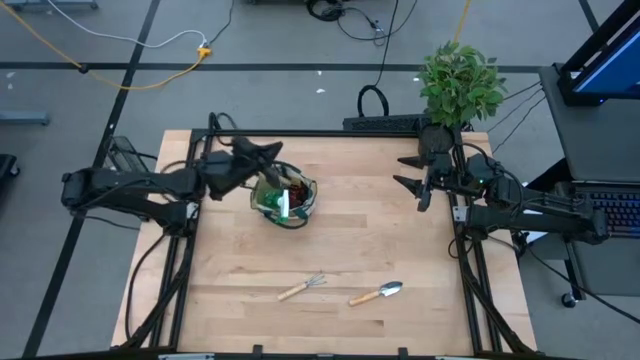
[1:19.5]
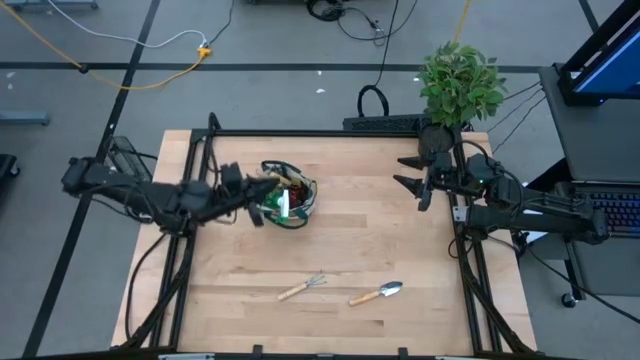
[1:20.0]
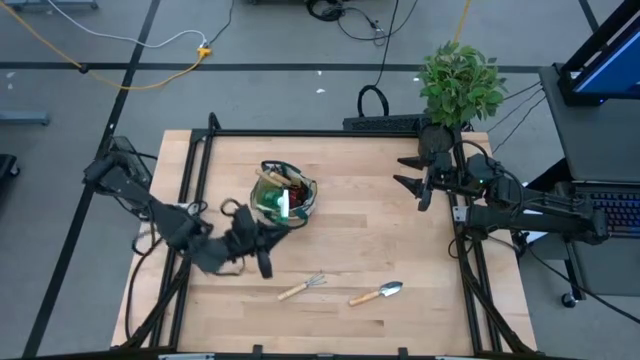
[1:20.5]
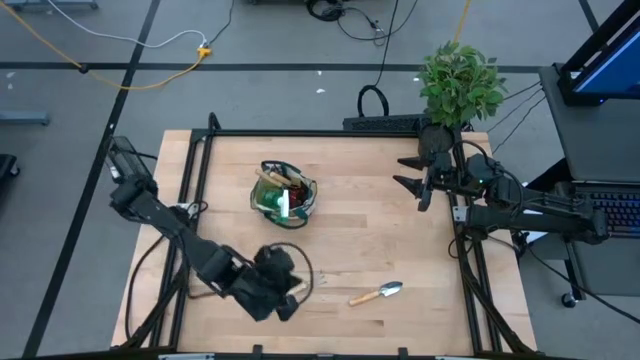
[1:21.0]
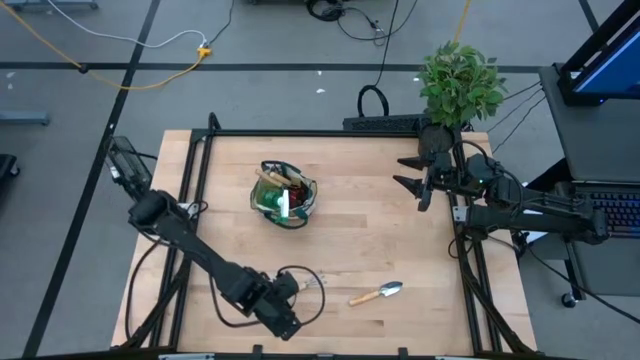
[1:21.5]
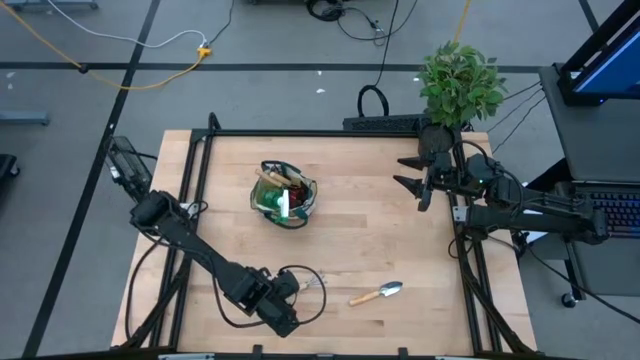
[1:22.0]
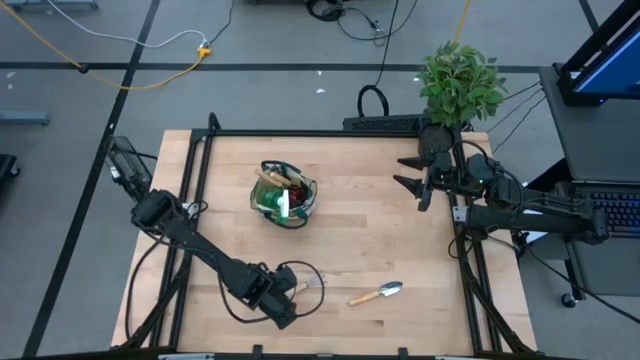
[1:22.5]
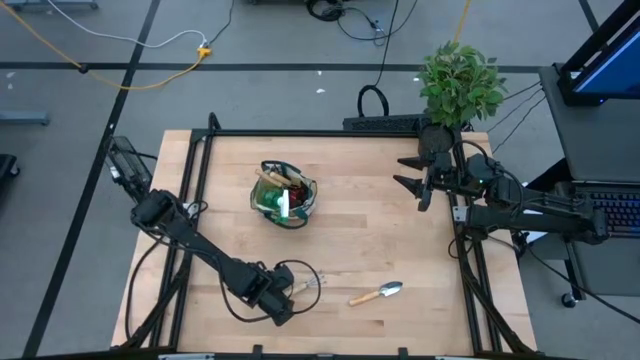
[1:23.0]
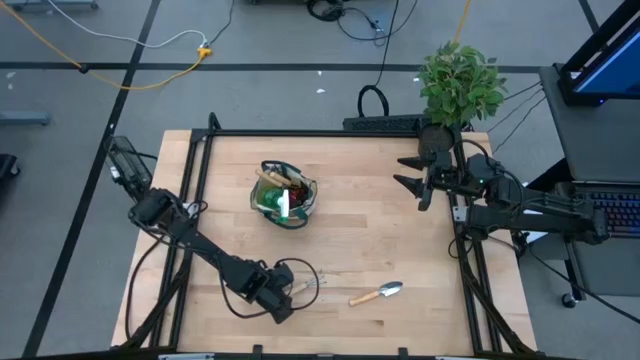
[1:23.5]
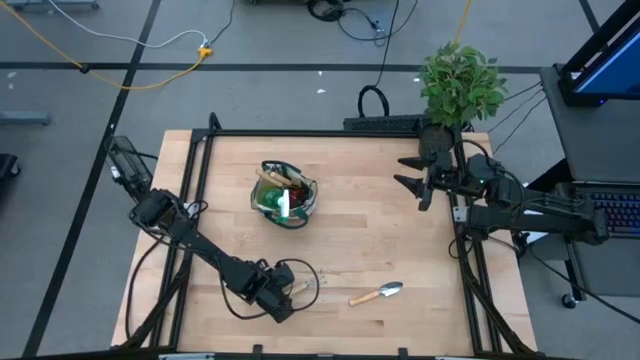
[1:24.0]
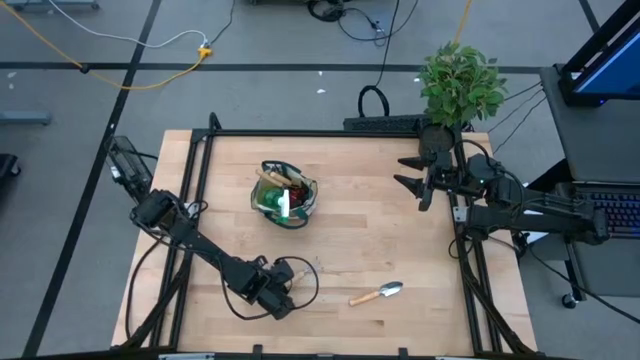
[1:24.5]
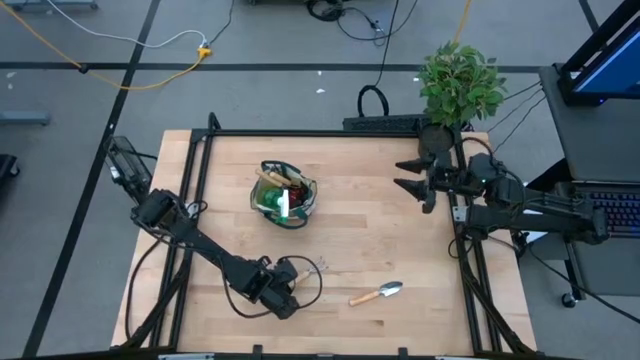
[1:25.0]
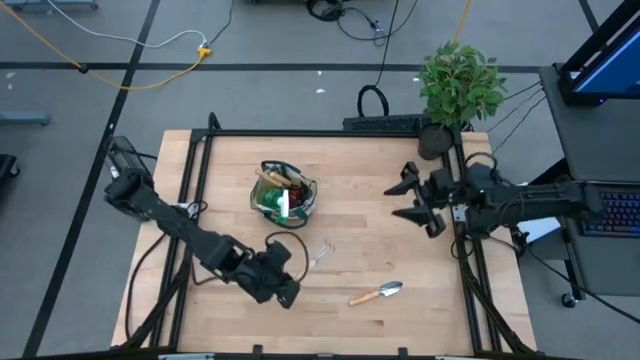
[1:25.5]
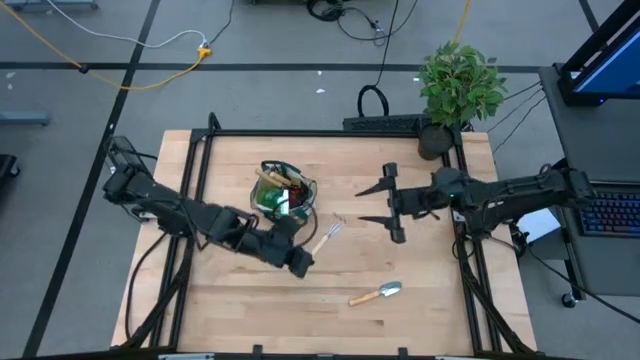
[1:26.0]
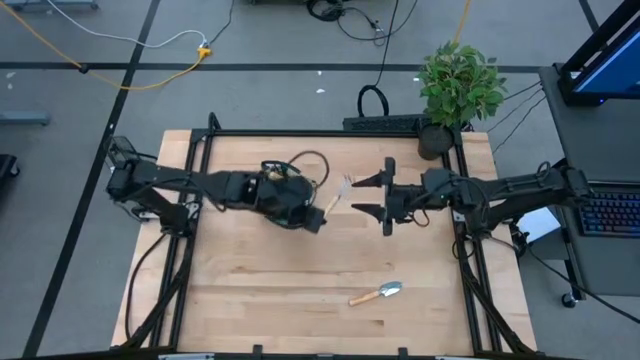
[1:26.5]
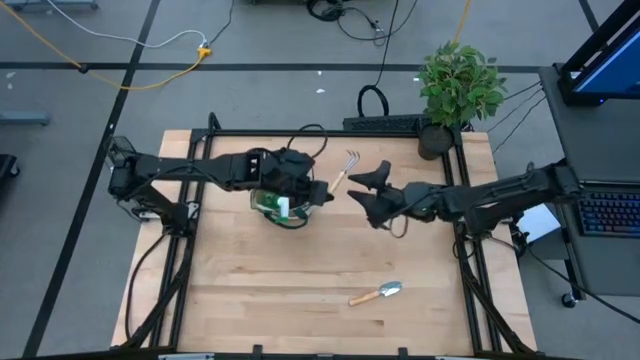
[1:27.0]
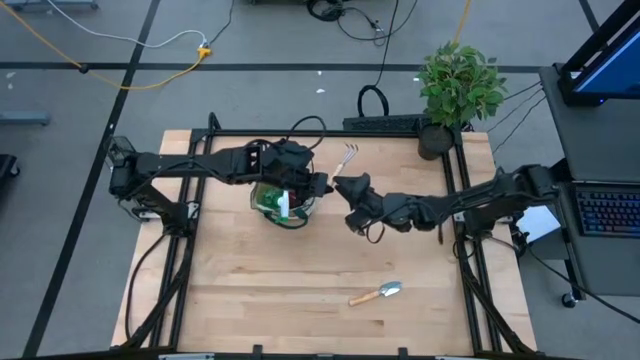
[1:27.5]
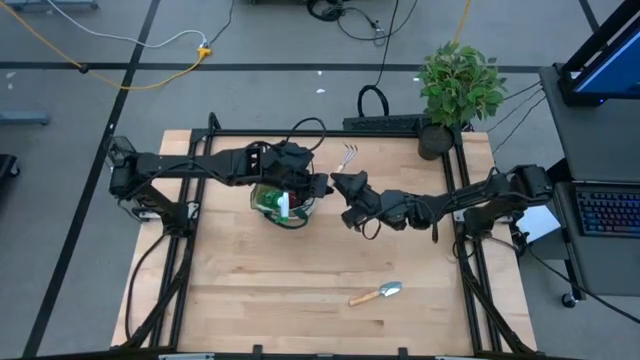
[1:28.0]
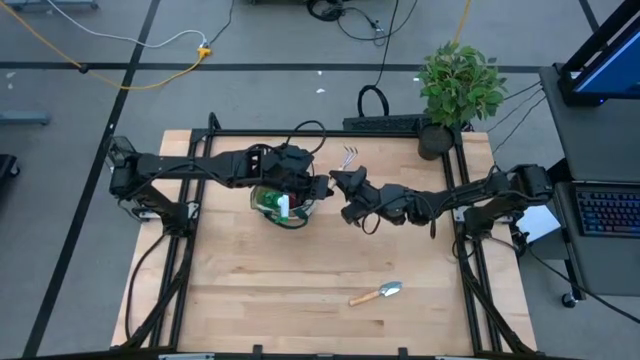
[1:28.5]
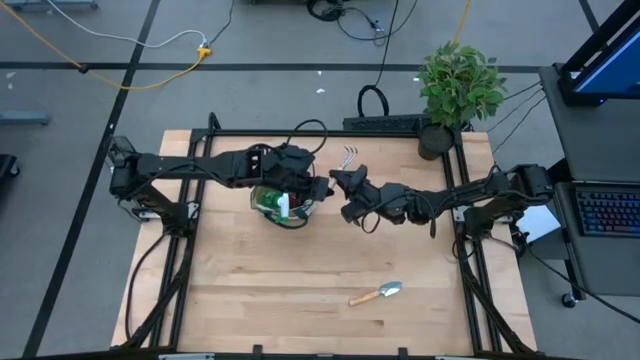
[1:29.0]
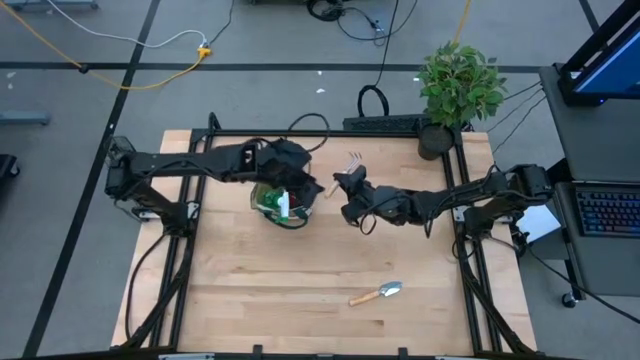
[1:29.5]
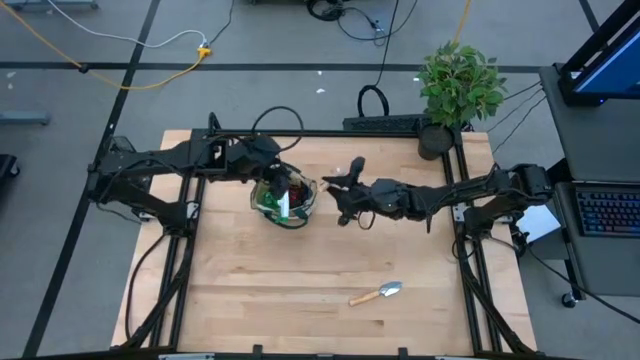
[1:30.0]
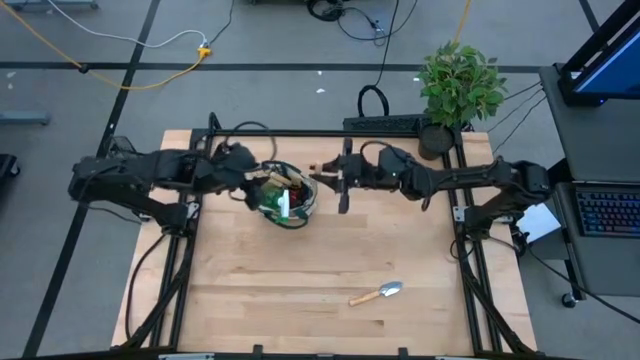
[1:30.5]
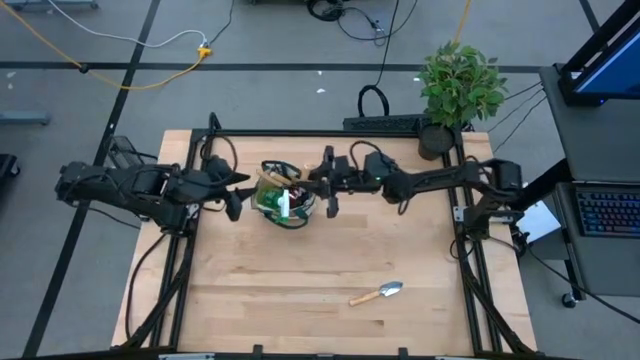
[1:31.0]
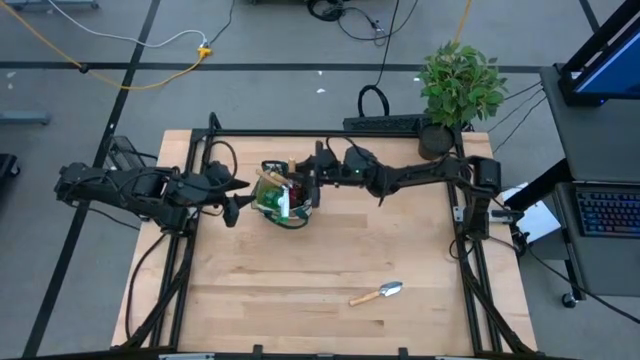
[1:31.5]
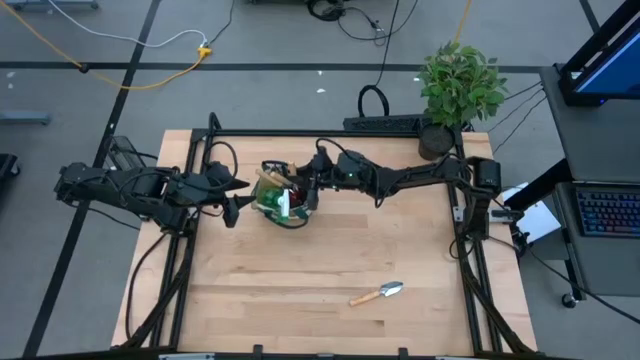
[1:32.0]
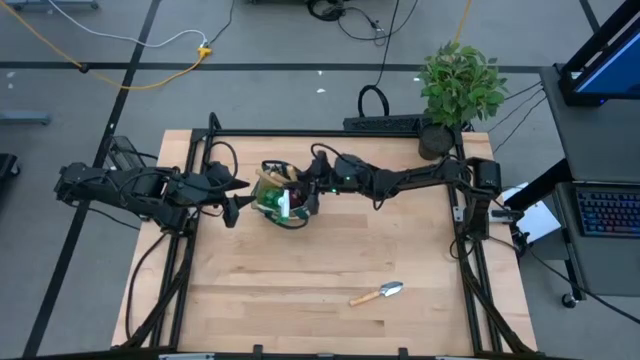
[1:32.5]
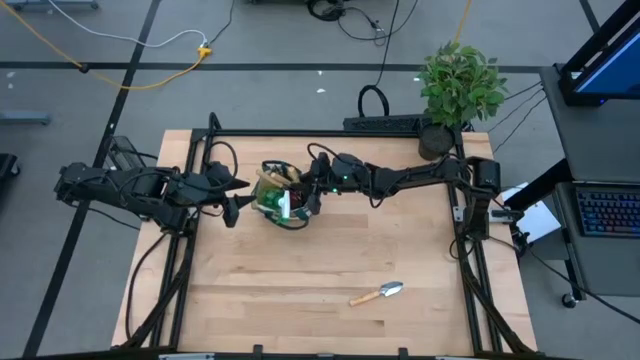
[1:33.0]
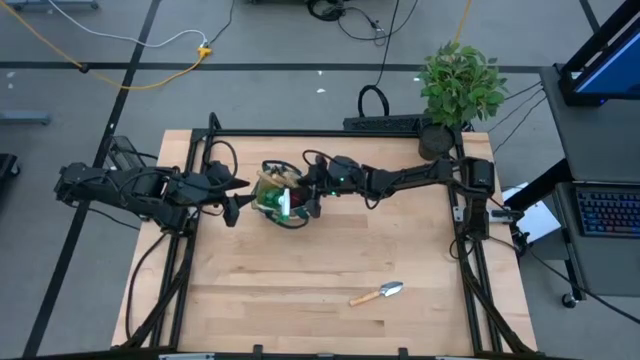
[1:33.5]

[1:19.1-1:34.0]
Task: Pick & Place Garden tools in Gardening bag
Put the brown hand rake into the gardening bag

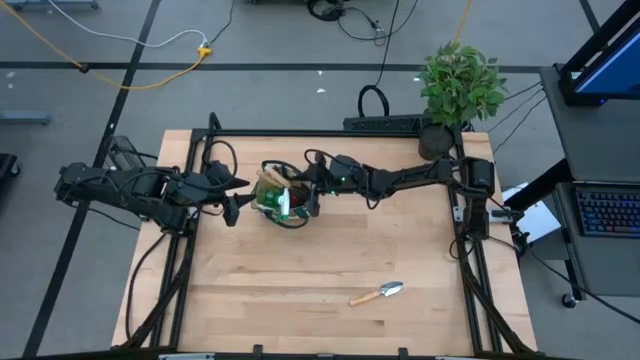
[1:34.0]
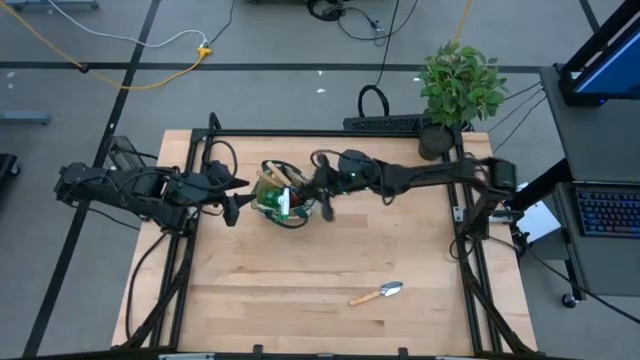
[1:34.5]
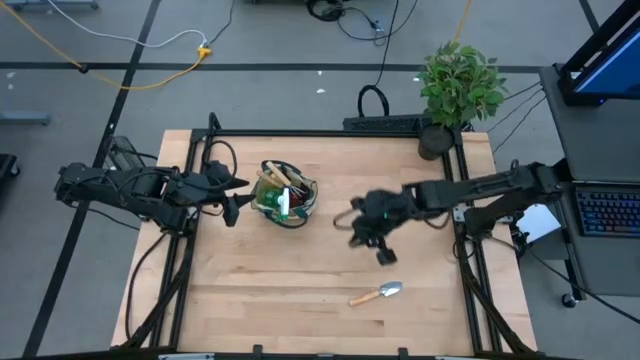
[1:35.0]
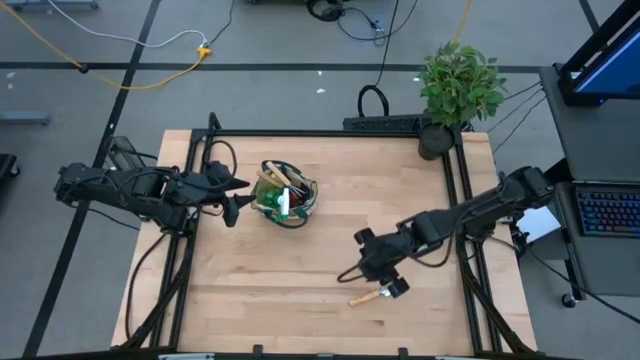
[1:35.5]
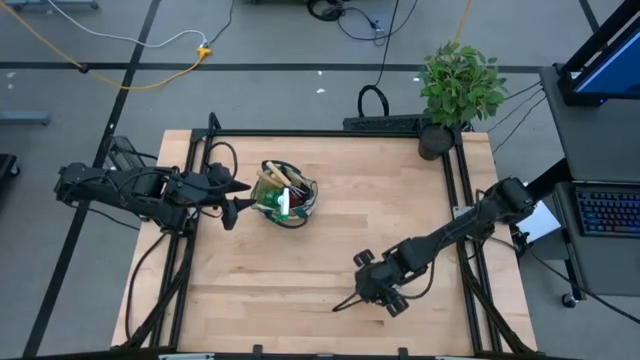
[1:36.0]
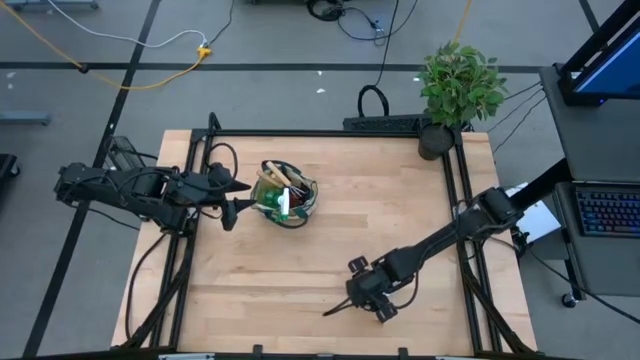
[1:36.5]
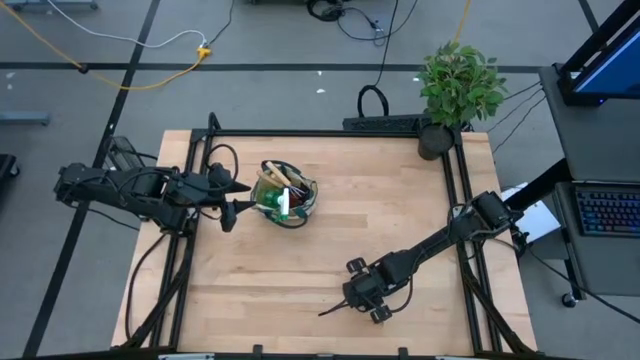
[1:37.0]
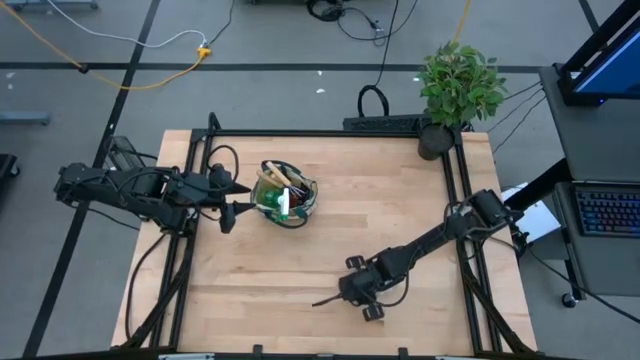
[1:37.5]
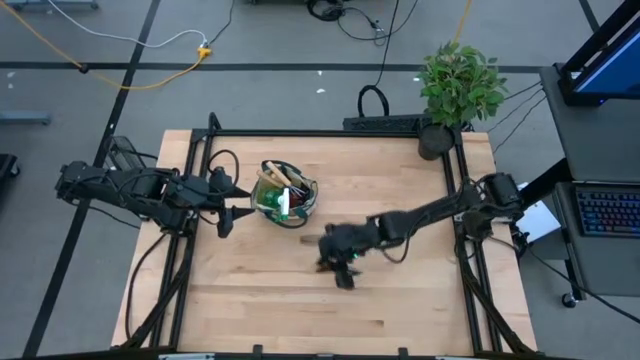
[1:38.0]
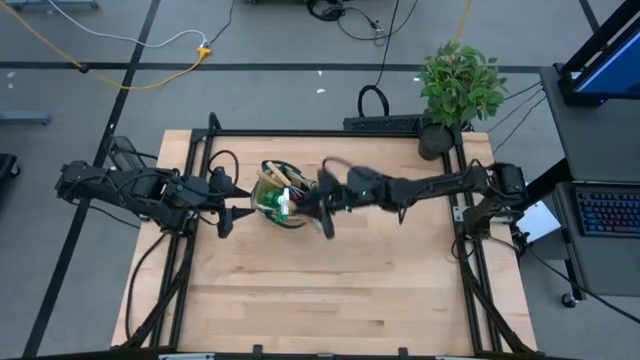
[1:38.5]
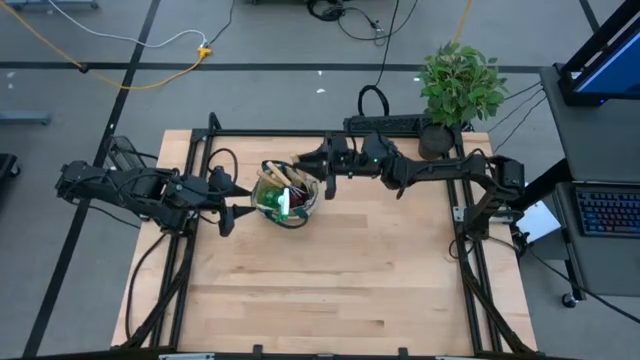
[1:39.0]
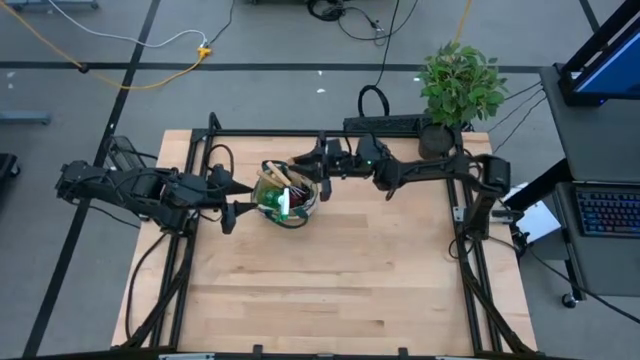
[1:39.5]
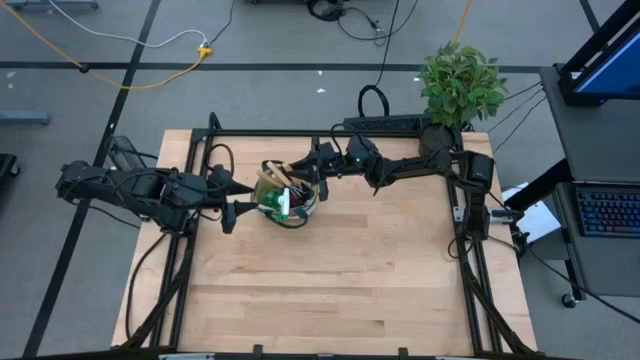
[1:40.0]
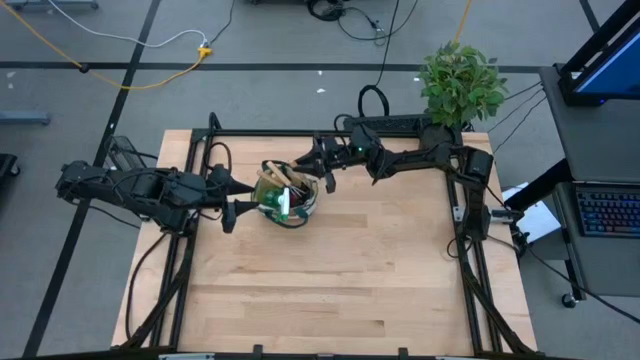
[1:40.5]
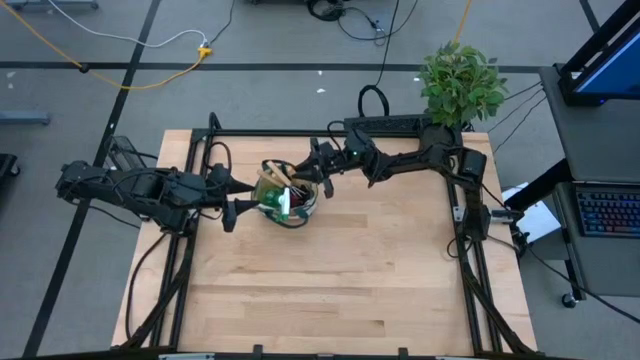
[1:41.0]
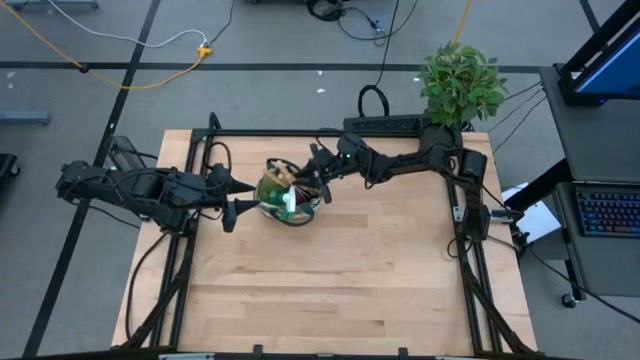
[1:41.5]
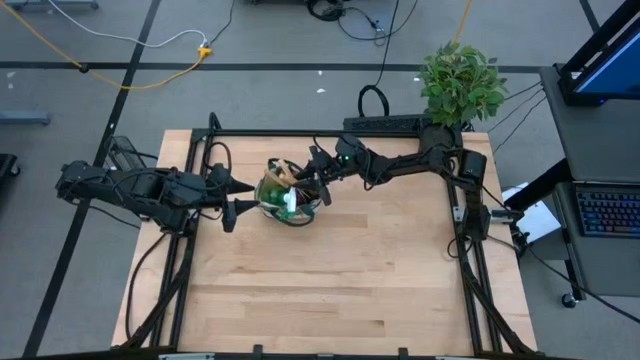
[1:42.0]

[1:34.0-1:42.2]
Put the brown trowel into the gardening bag
